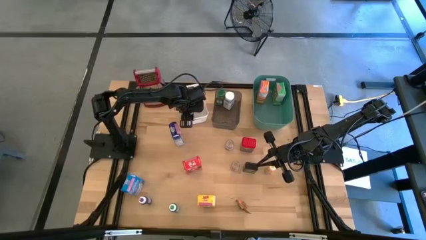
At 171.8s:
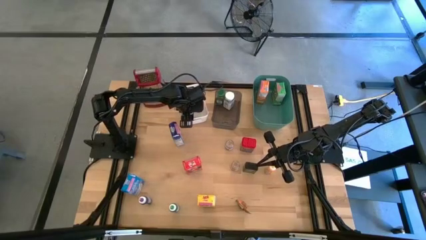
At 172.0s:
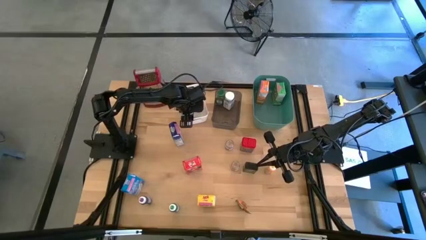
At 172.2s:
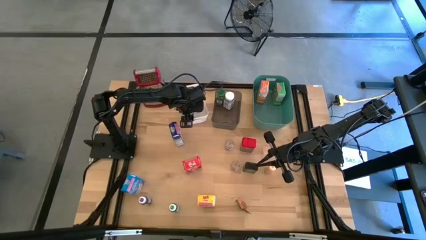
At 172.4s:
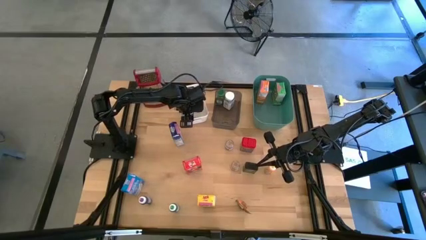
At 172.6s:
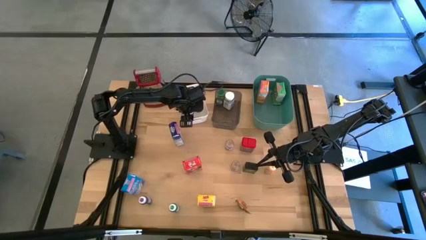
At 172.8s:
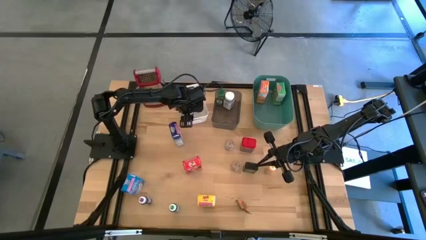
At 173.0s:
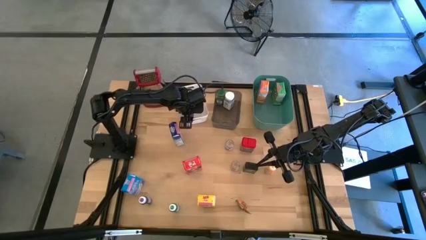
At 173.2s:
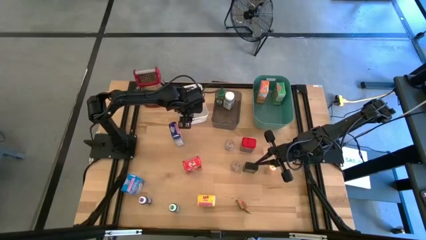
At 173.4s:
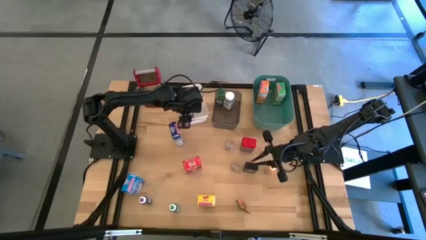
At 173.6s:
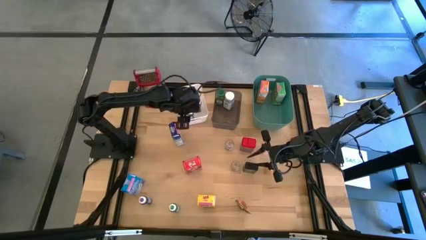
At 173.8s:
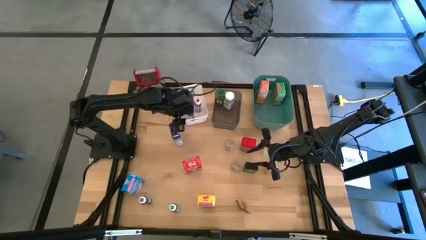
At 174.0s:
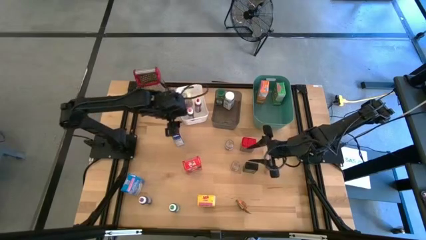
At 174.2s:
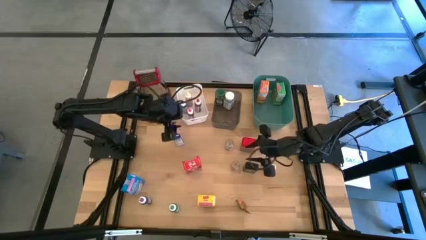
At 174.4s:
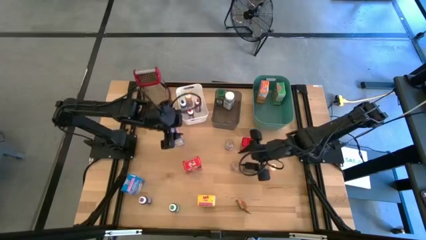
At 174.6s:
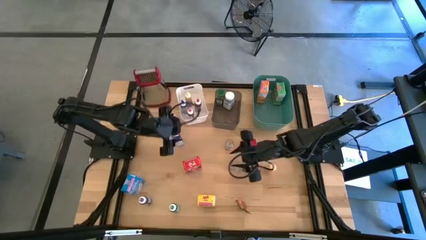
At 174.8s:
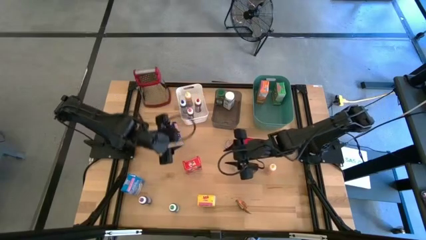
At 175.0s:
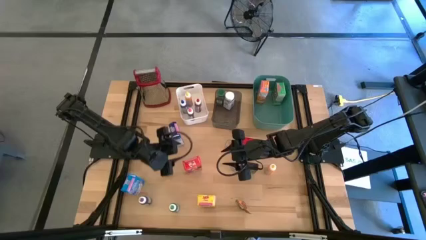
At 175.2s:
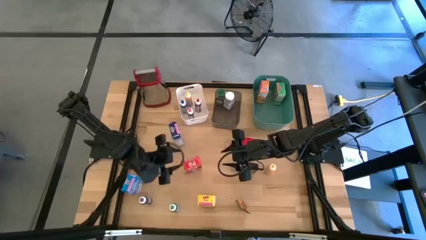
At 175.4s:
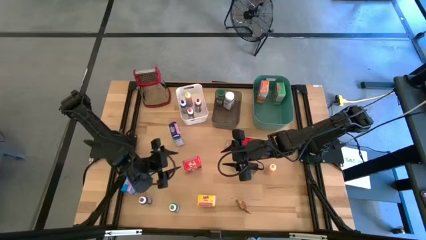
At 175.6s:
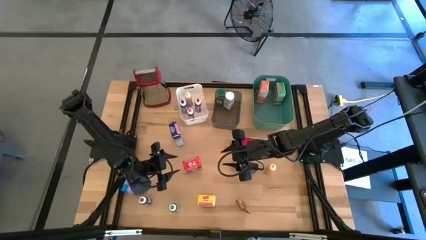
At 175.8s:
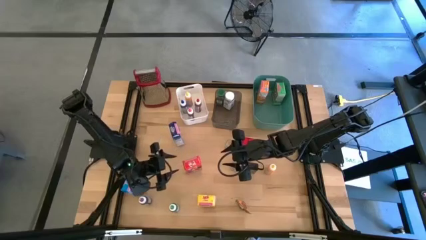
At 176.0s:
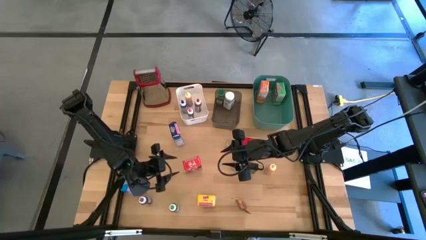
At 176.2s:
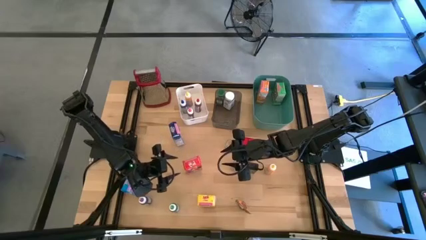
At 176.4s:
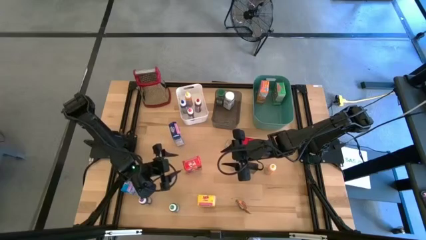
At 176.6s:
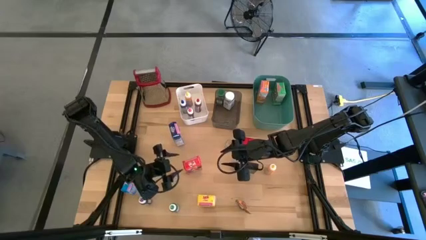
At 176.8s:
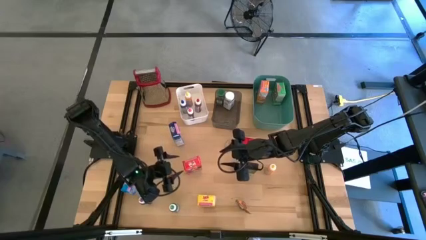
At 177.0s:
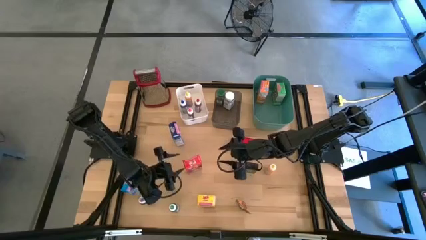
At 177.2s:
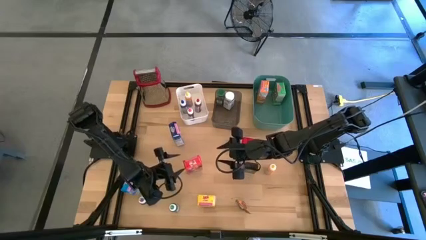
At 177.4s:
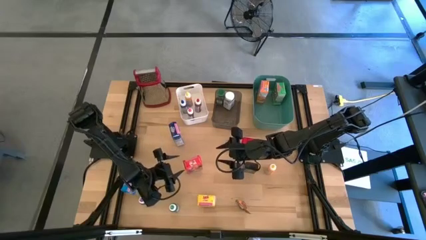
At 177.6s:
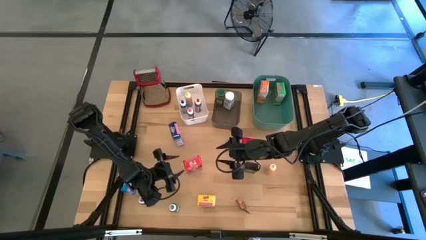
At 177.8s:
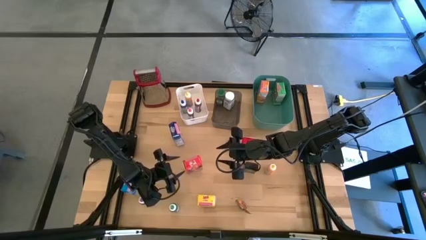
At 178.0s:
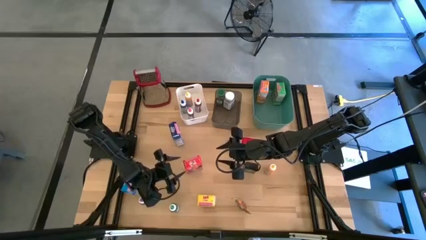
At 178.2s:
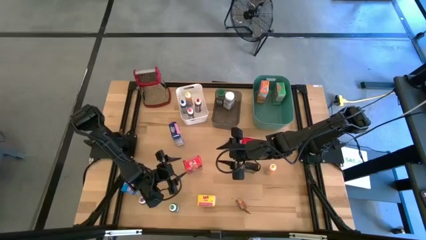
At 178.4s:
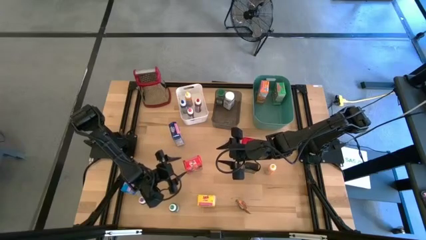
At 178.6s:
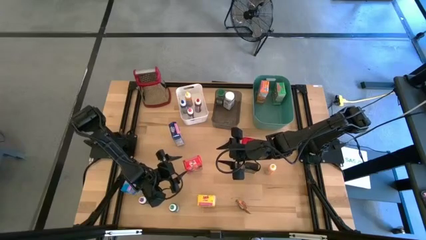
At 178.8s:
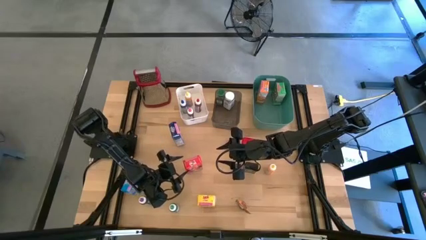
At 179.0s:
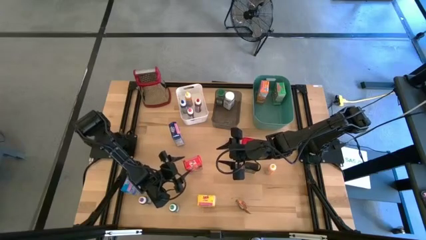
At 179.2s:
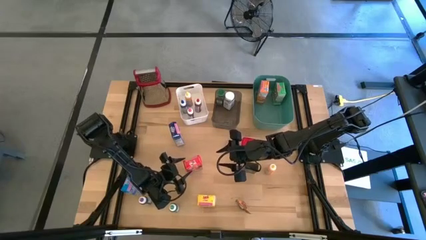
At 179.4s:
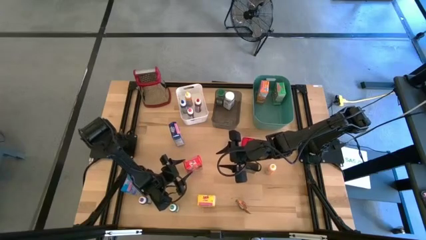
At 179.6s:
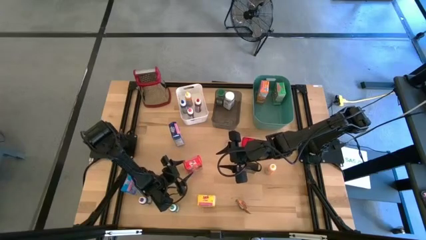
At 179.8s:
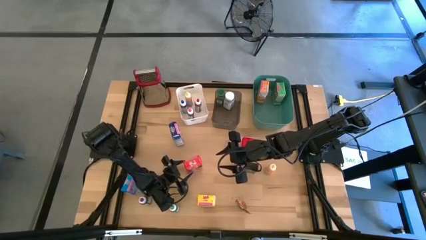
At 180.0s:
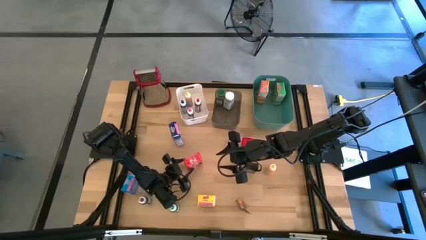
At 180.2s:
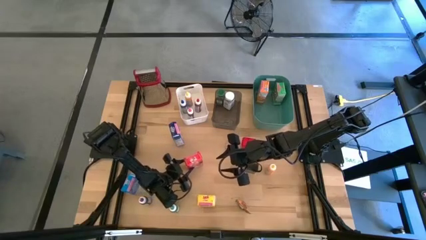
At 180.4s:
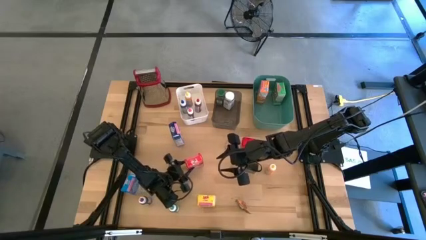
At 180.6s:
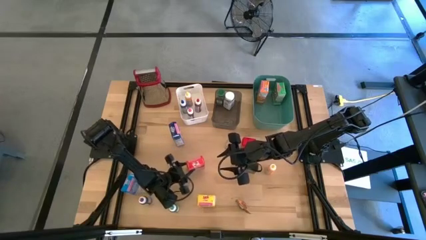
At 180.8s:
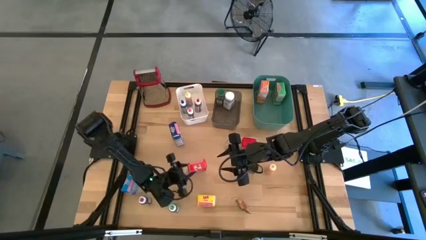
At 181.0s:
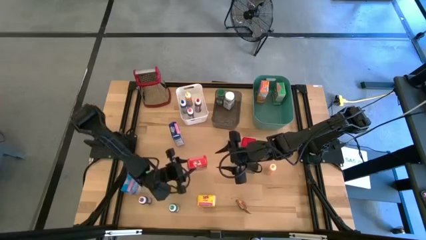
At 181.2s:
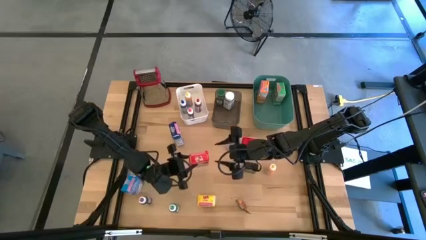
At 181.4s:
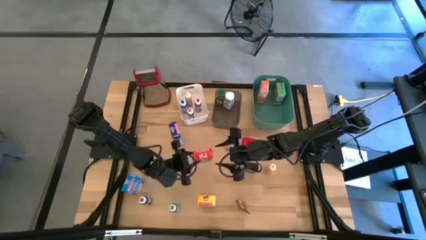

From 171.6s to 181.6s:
Task: Pick & Place Kitchen Items
Put the red cereal box into the green bin

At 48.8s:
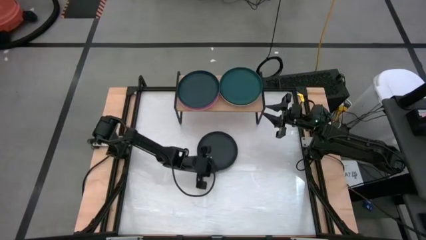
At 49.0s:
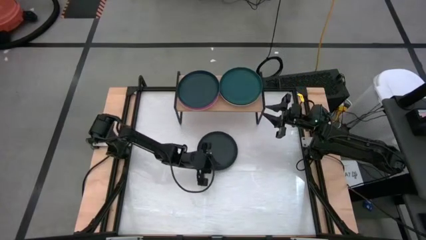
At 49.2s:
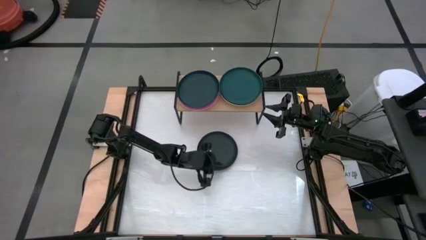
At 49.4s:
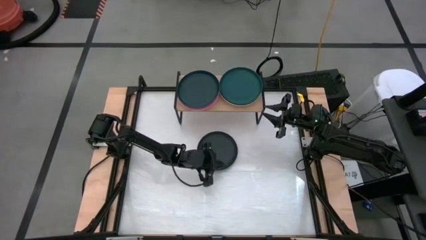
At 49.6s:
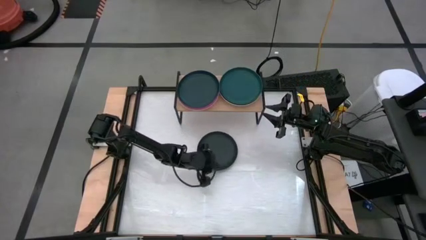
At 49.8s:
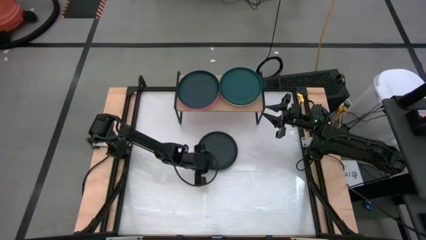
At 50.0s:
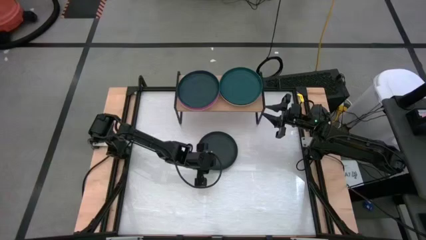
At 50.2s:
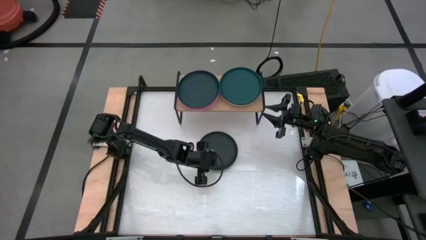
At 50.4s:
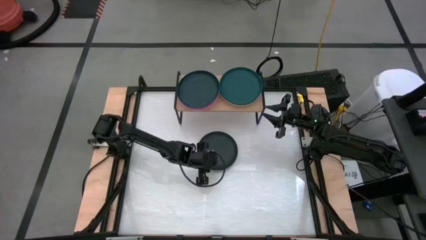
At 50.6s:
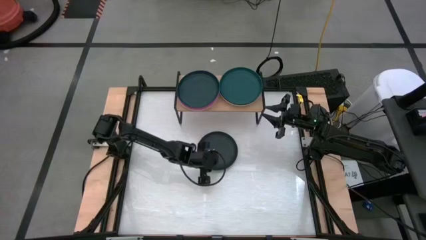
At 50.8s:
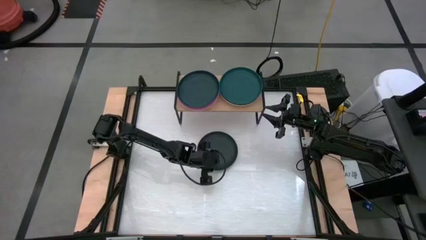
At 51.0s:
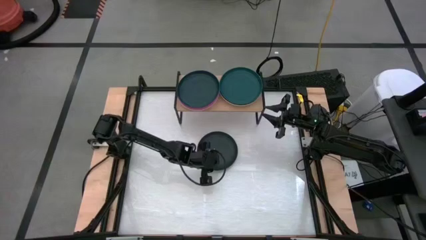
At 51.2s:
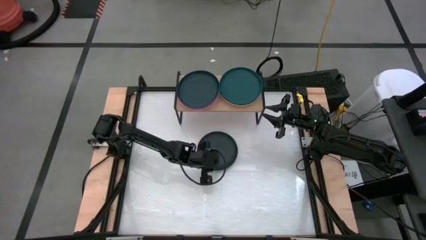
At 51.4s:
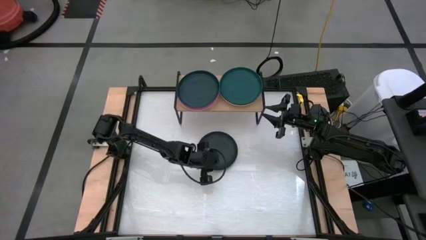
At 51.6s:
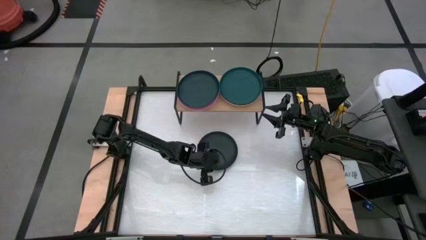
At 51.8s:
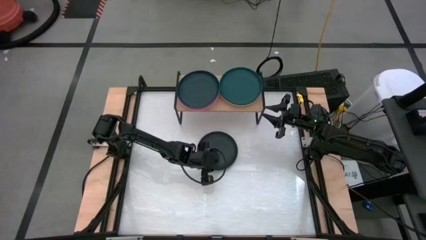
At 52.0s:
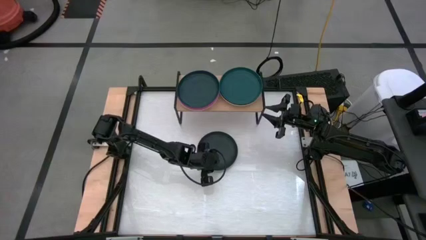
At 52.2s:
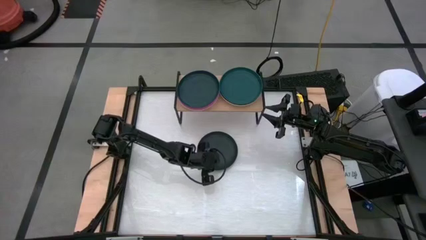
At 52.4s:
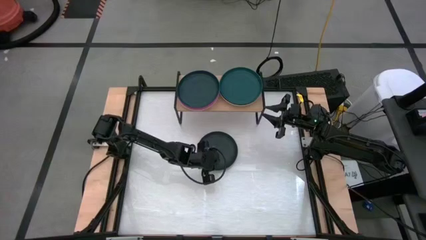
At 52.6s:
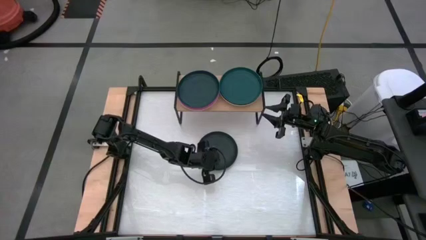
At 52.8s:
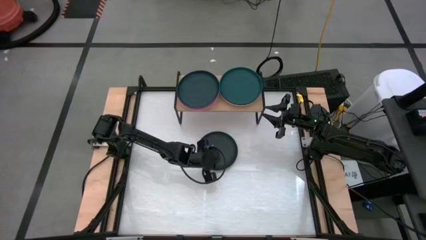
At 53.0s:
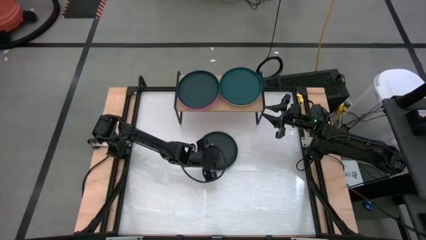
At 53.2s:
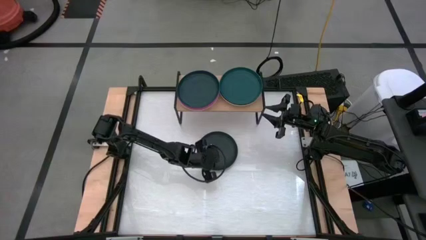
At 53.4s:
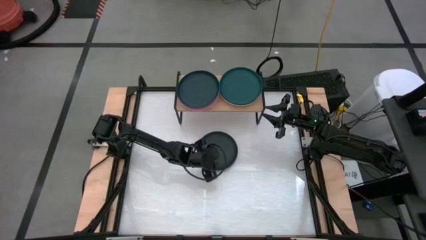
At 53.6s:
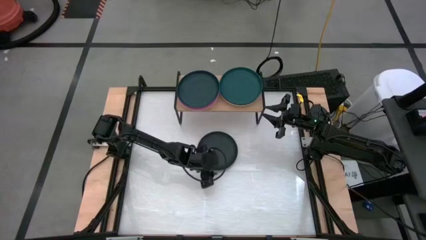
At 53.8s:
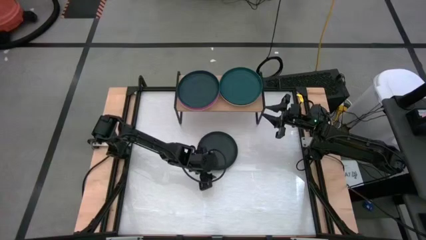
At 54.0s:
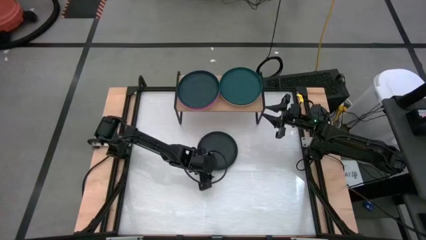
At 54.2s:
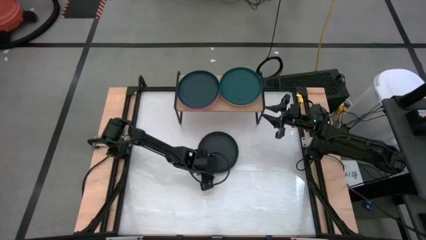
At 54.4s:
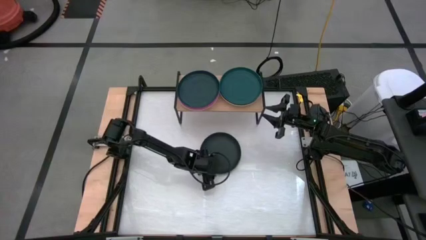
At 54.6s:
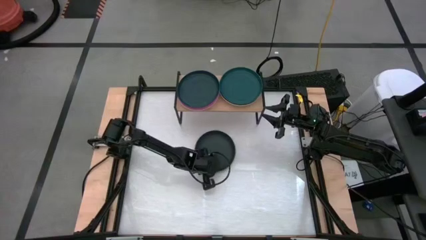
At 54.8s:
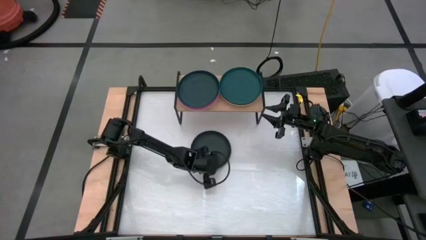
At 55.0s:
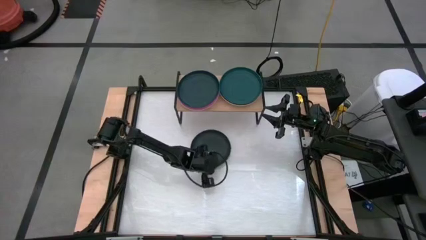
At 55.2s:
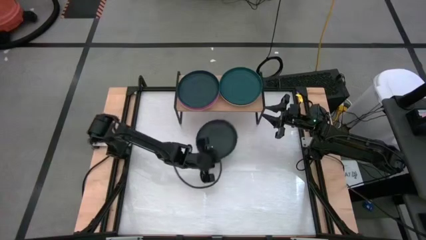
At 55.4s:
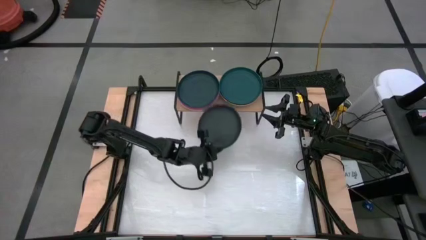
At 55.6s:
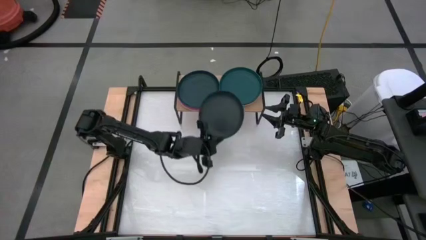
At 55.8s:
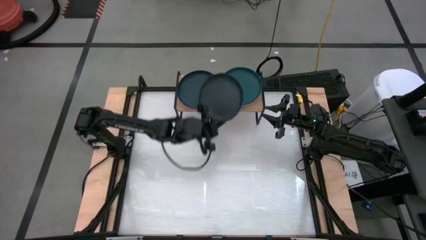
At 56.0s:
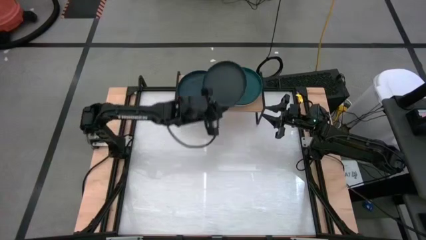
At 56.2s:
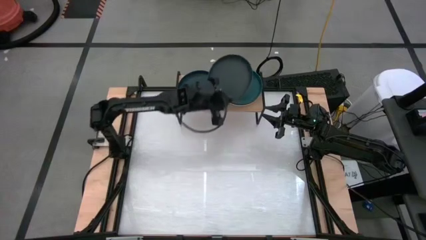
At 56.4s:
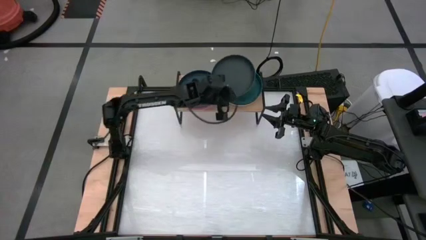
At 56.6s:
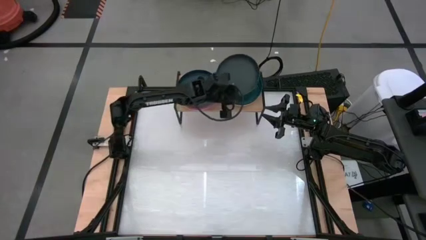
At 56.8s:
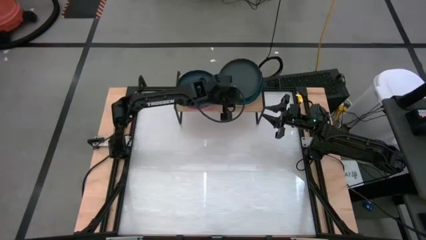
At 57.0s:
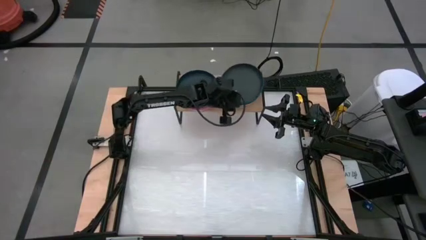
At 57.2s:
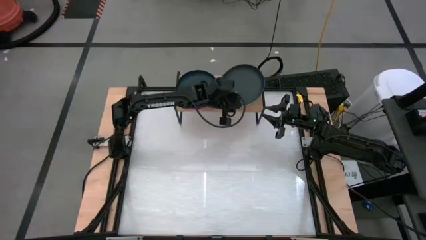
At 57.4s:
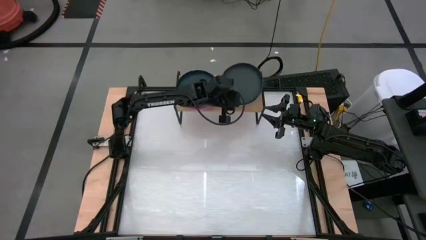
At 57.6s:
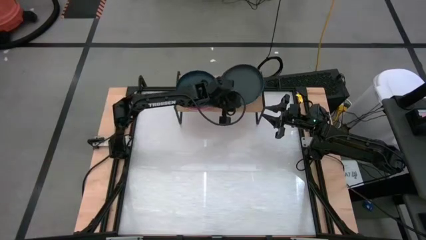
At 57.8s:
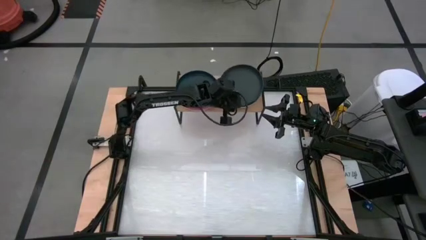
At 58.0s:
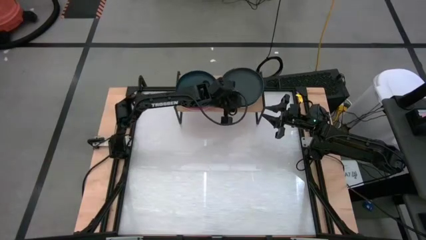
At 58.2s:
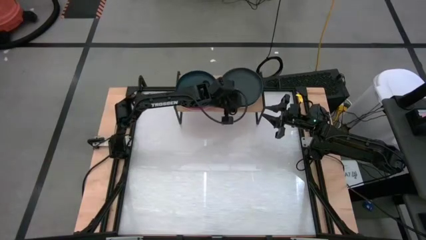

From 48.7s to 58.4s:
Task: Place and stack plates onto a shelf
Stack the black plate on top of the green plate on the shelf
